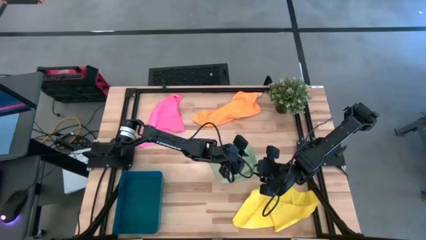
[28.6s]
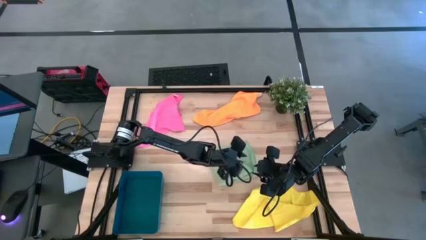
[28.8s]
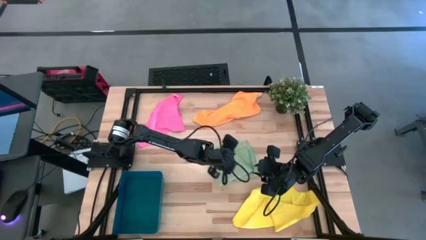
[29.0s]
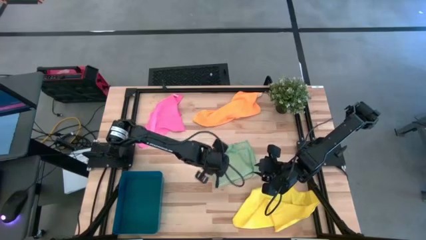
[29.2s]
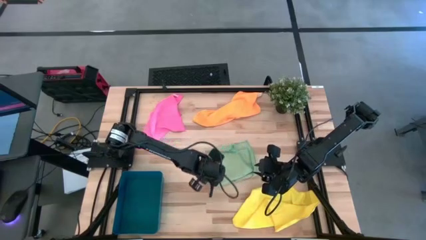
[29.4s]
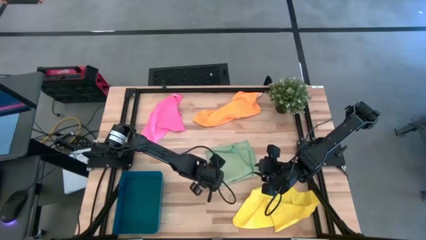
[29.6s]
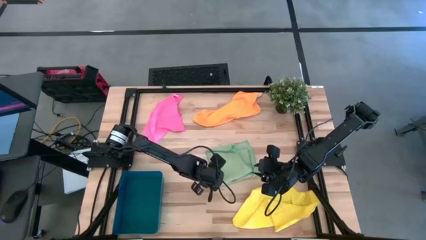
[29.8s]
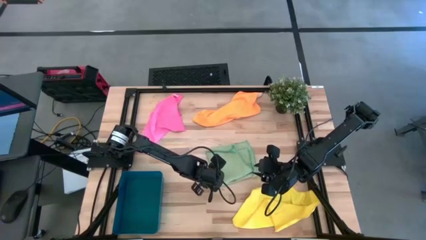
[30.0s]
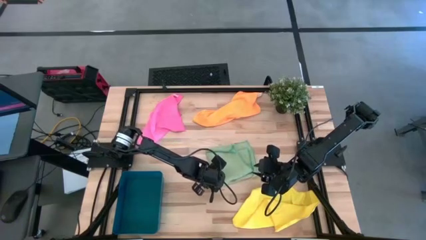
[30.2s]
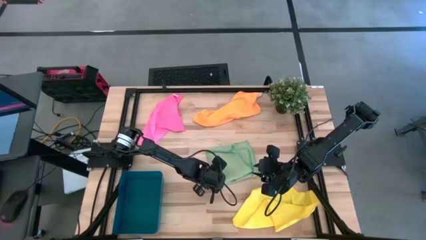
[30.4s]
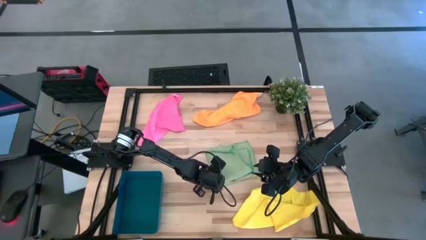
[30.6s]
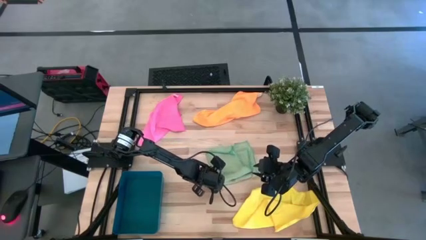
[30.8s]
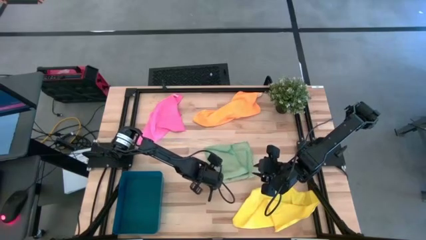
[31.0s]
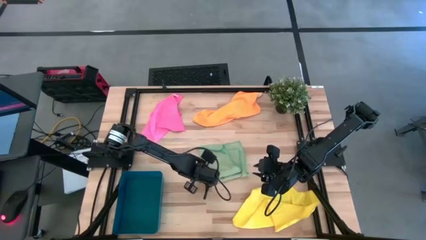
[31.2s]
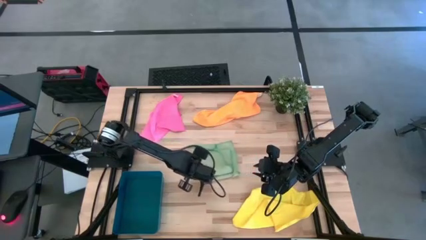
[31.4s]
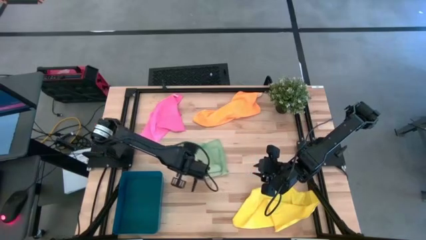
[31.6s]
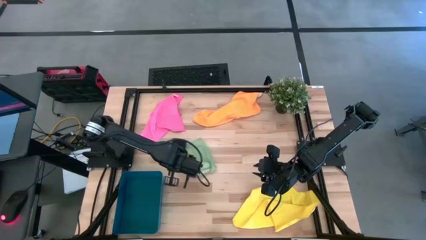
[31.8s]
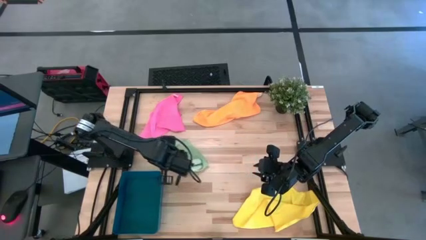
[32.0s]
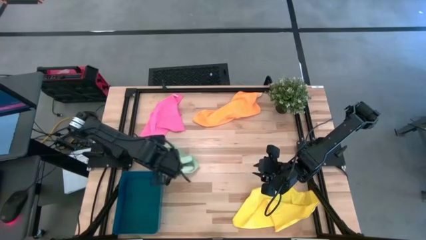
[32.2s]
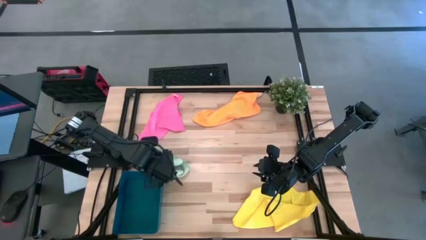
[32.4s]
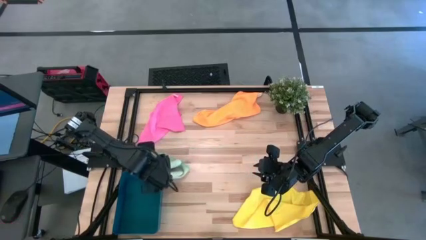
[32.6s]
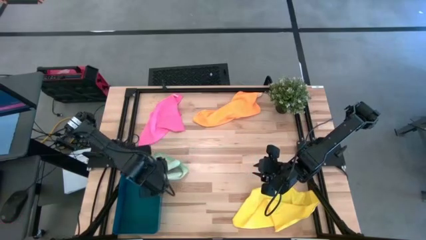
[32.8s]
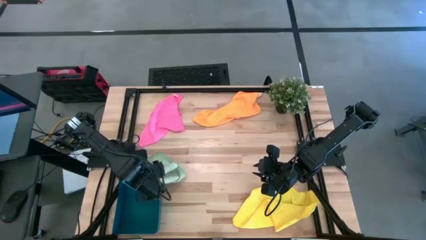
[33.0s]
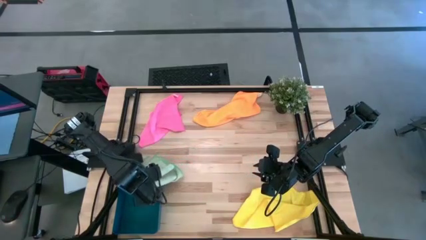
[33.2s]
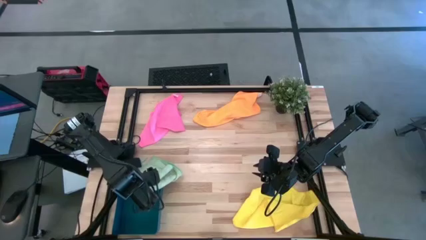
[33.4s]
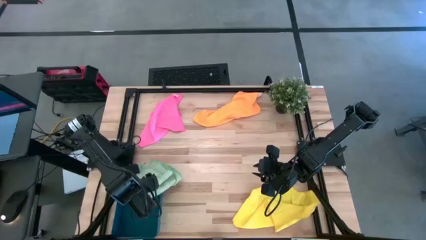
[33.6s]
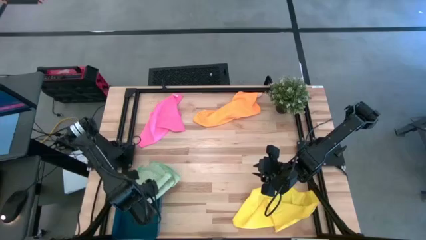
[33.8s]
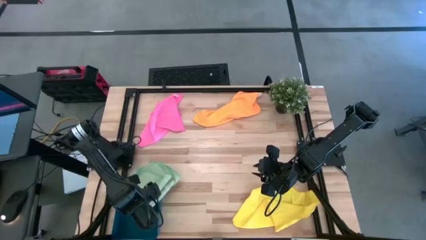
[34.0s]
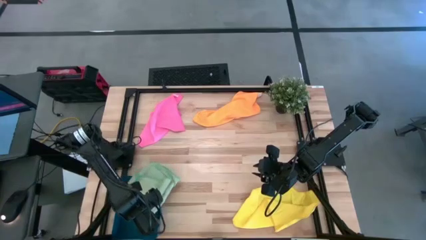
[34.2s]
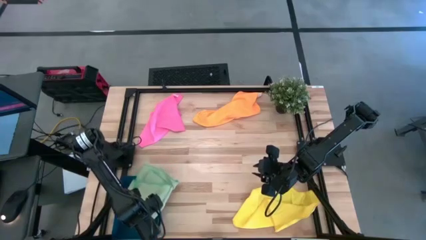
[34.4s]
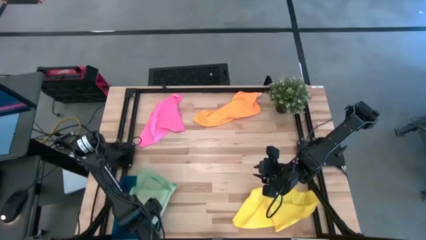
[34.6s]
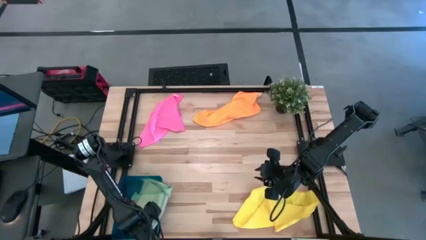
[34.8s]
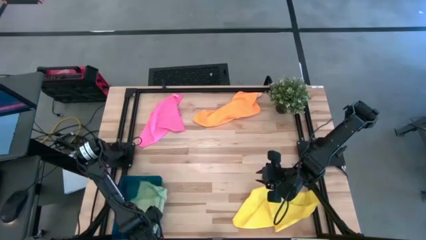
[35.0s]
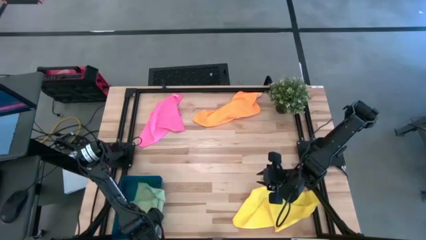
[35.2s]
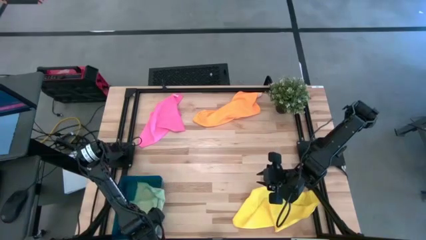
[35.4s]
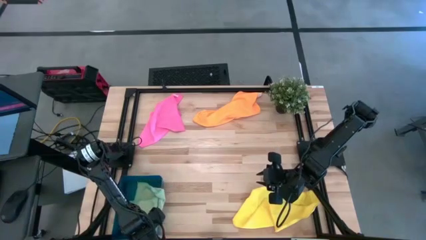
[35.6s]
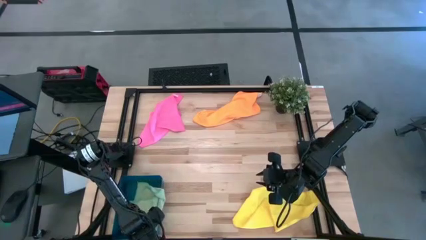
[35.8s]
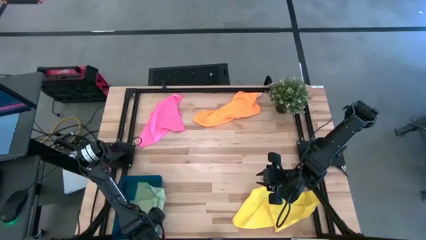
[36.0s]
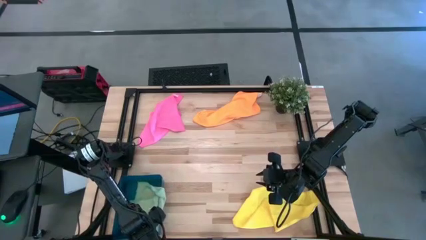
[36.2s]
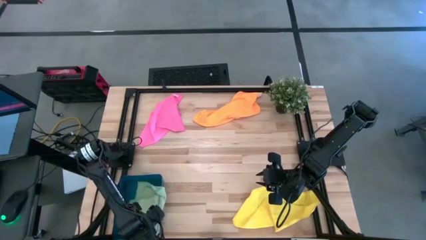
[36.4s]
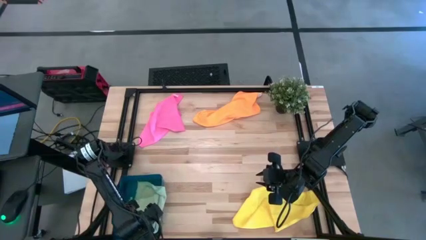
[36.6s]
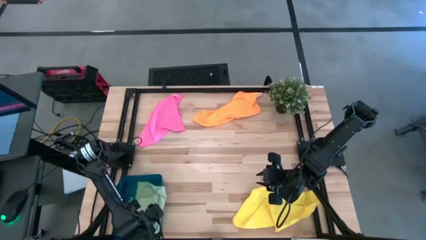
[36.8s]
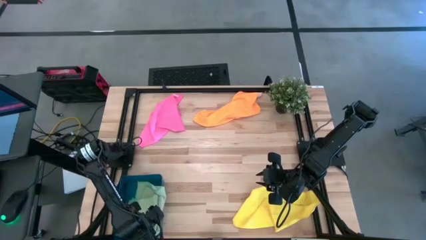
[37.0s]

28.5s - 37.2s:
Task: Fold microfiber towels
Put the green microfiber towel into the bin

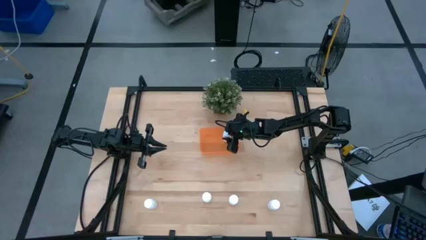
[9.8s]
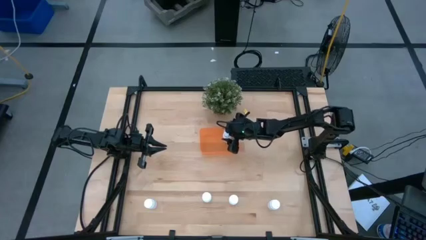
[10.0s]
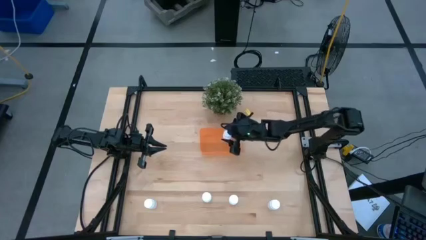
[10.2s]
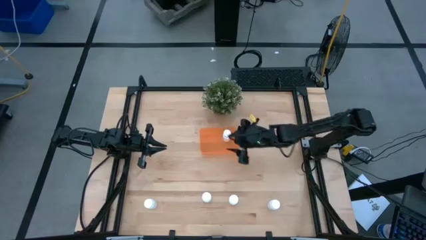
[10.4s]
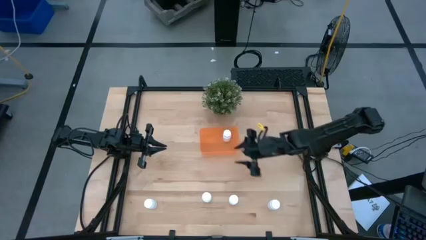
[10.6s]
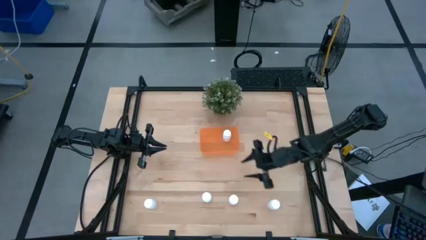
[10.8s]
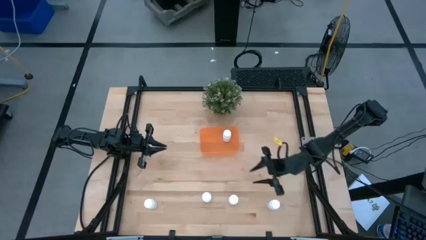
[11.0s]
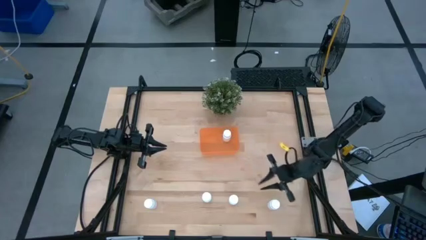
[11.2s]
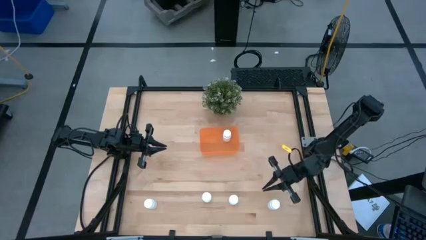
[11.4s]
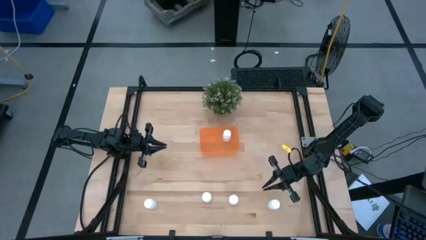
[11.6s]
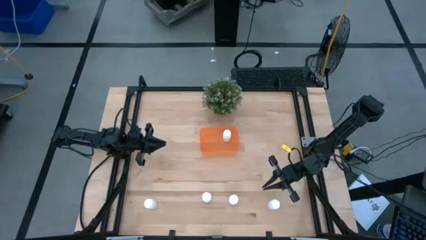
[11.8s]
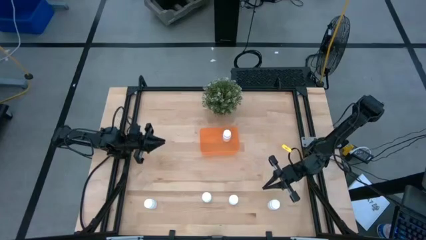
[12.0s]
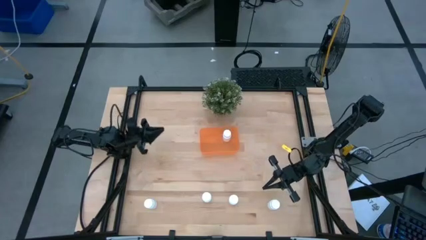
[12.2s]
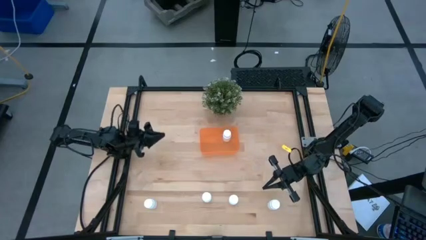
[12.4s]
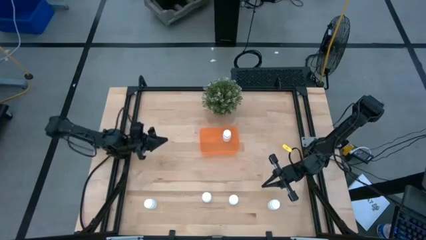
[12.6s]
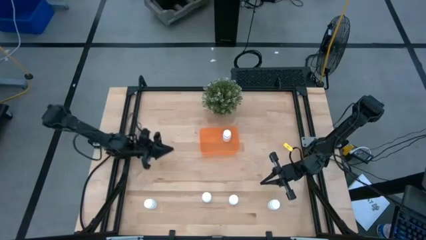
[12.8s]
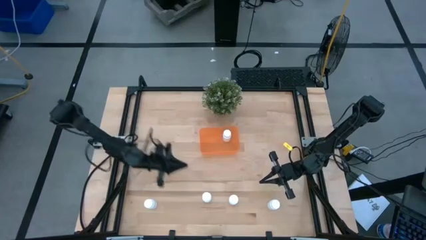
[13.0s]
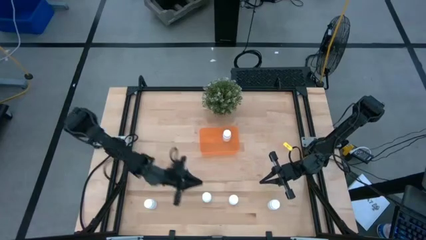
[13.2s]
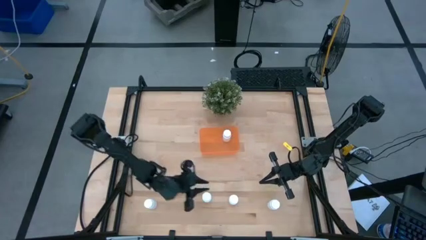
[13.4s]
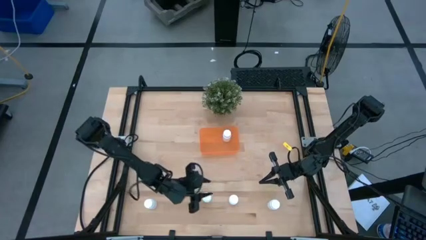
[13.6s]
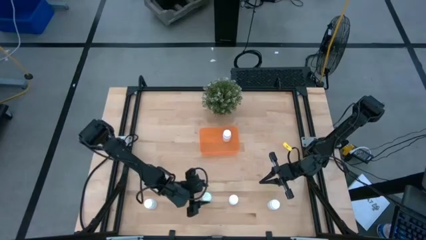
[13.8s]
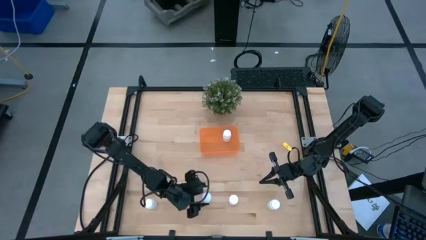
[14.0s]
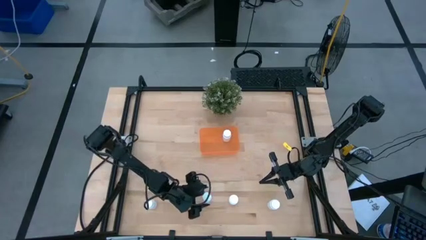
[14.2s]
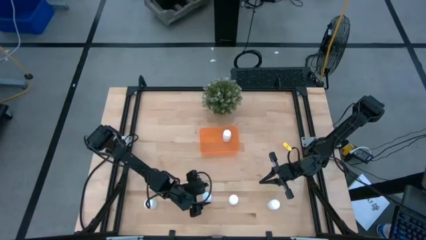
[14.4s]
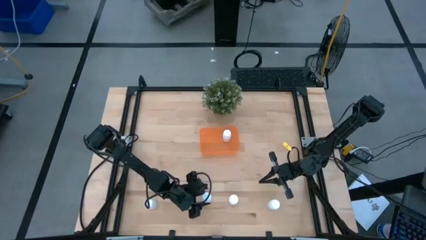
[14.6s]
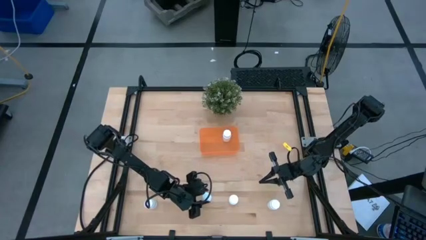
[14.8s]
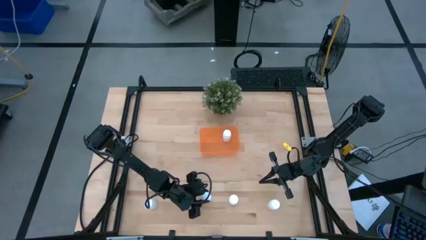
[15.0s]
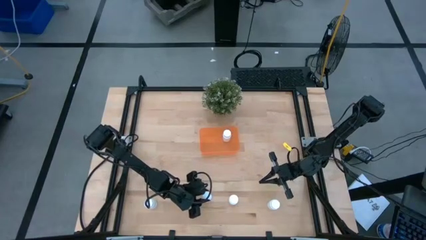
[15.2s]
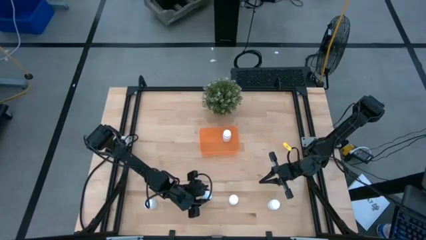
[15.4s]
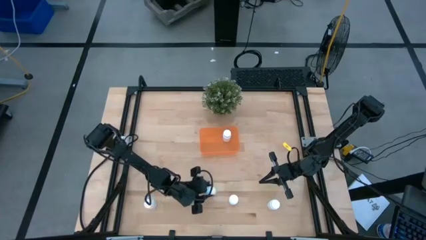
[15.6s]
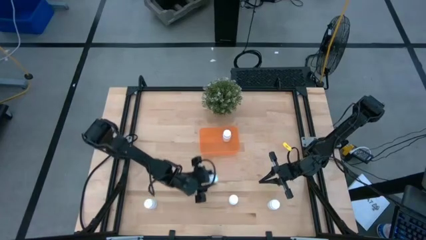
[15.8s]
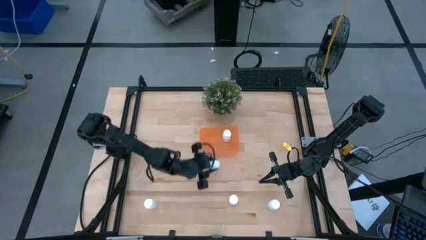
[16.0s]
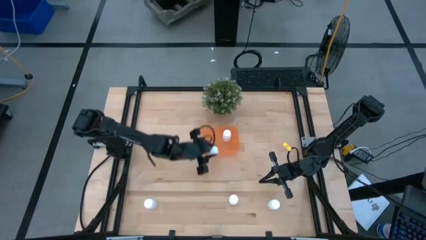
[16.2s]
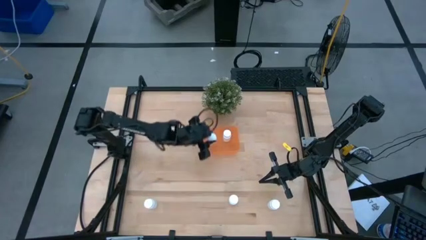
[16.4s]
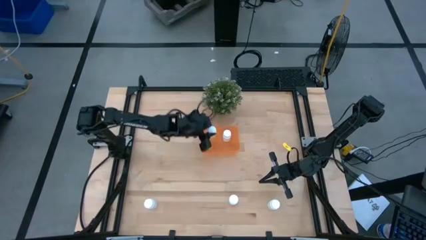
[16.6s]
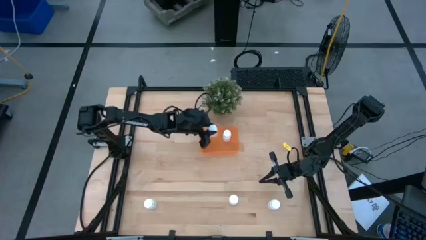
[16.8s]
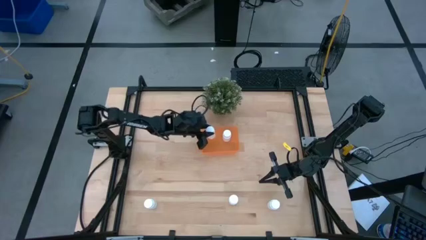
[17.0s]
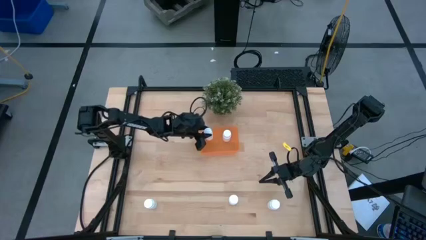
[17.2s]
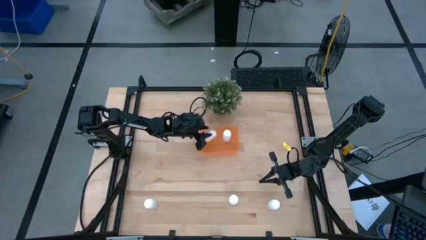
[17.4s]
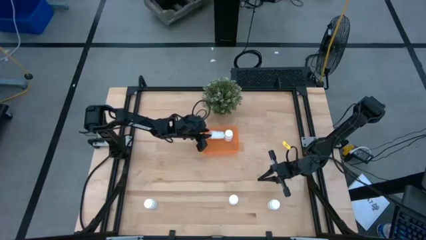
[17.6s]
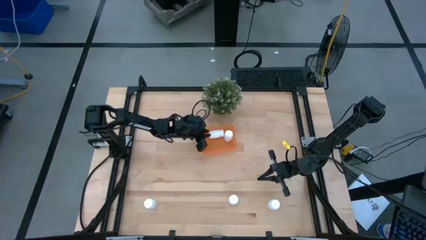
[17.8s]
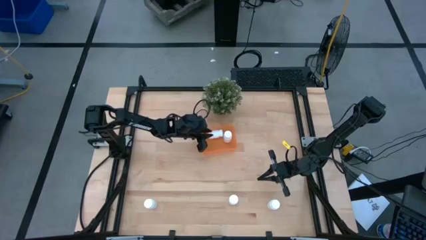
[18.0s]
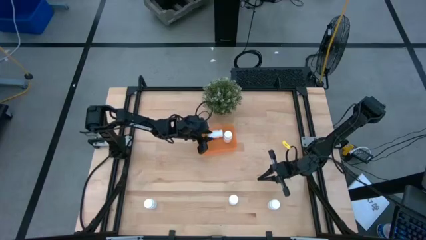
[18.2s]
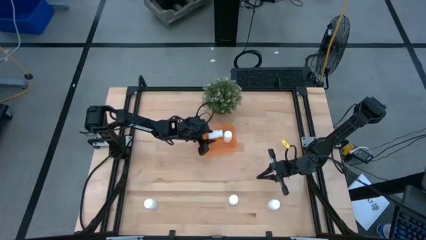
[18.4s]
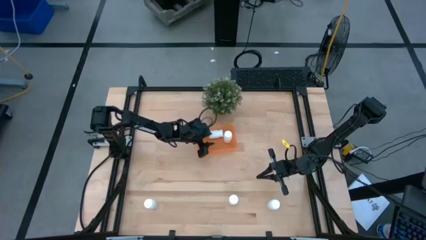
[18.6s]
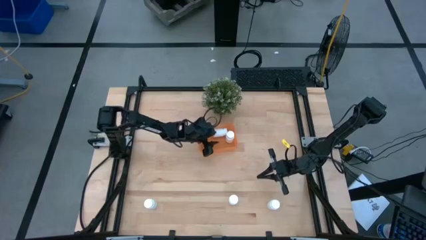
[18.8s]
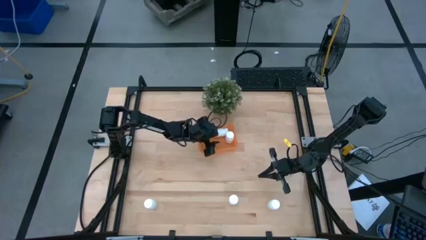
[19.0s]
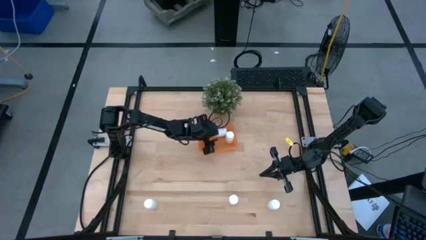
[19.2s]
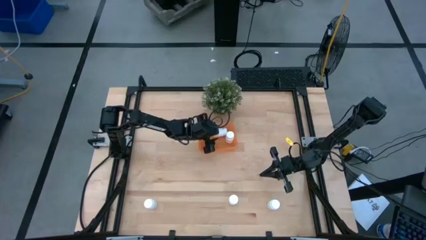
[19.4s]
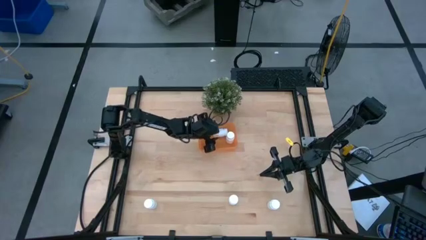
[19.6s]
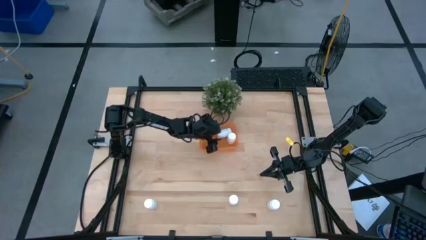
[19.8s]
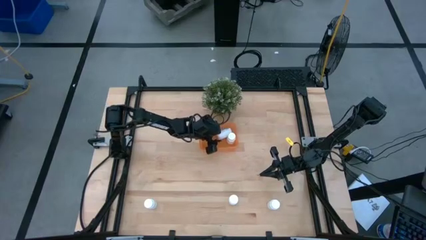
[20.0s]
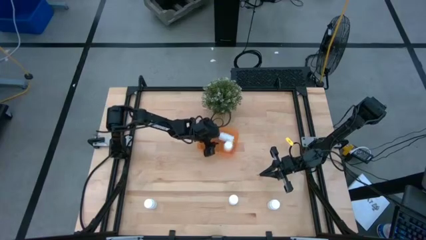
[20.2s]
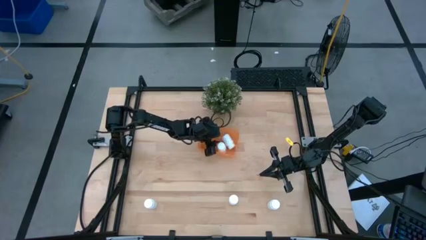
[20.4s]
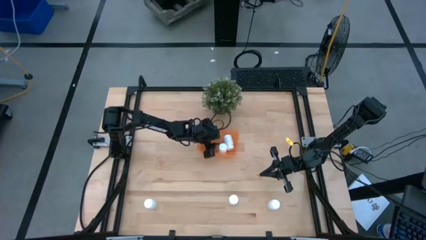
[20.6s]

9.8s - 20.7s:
Task: Pick and place pill bottles into a basket
Put the white pill bottle into the orange bin
